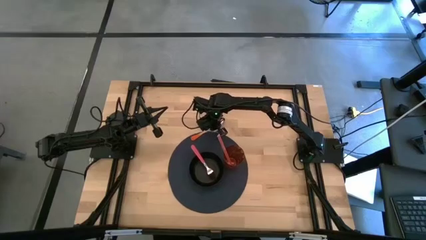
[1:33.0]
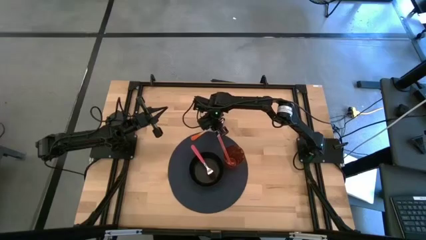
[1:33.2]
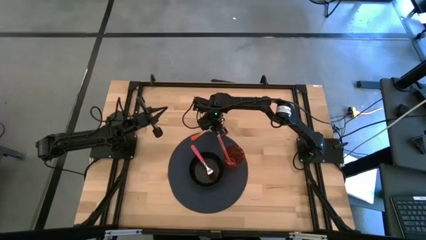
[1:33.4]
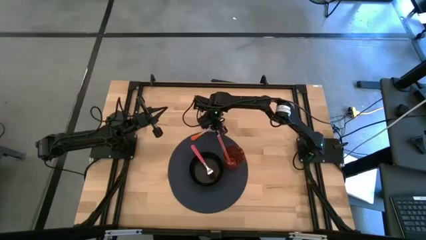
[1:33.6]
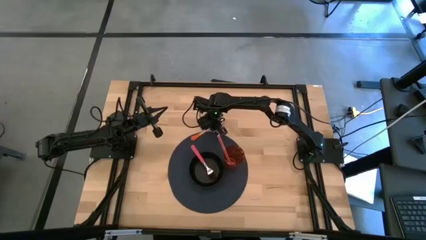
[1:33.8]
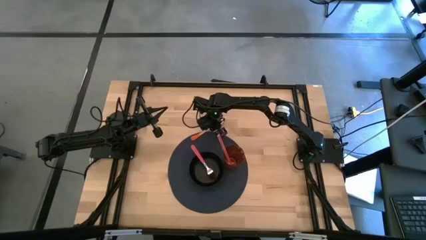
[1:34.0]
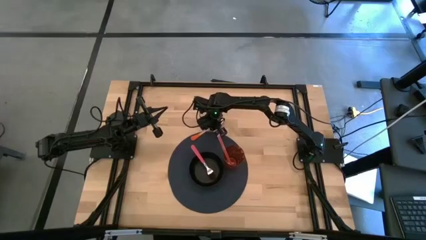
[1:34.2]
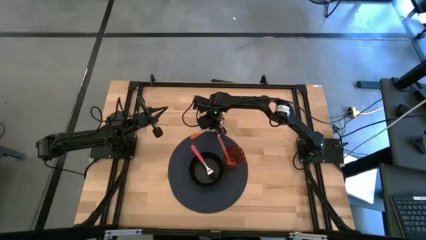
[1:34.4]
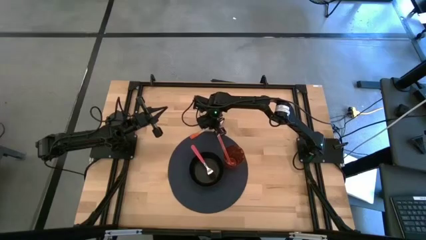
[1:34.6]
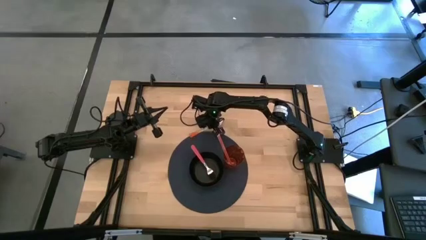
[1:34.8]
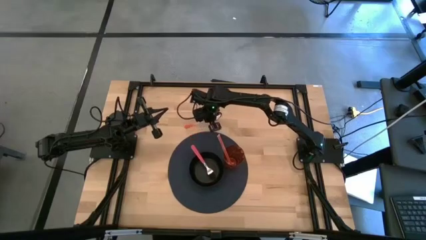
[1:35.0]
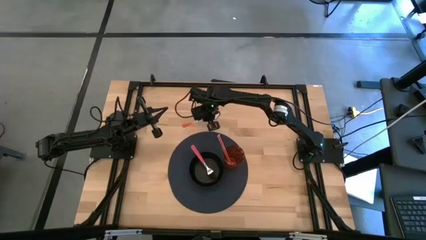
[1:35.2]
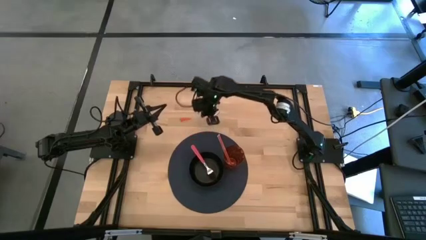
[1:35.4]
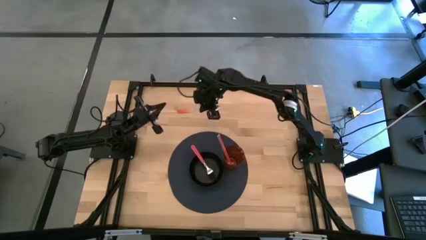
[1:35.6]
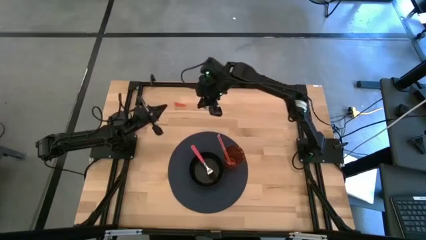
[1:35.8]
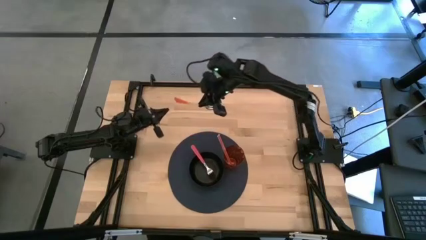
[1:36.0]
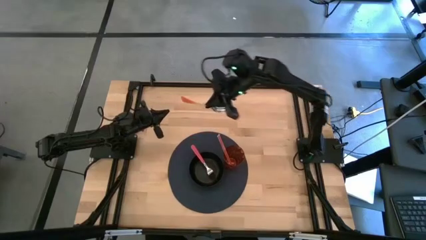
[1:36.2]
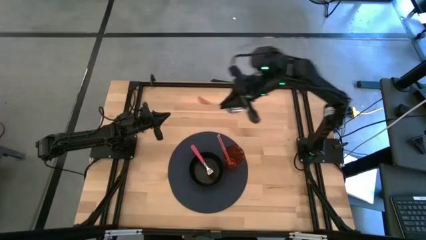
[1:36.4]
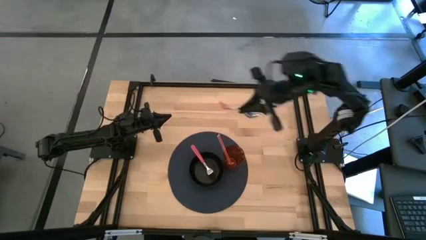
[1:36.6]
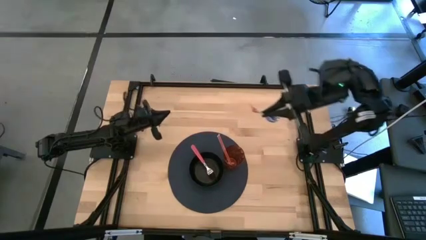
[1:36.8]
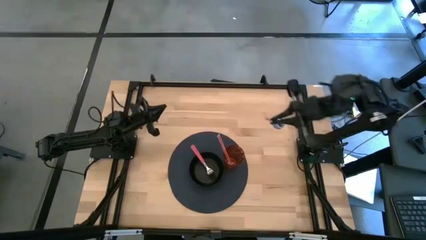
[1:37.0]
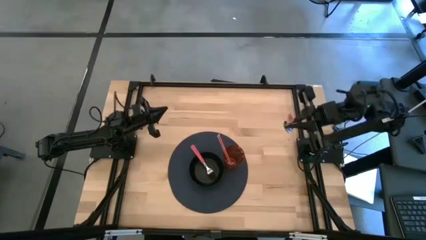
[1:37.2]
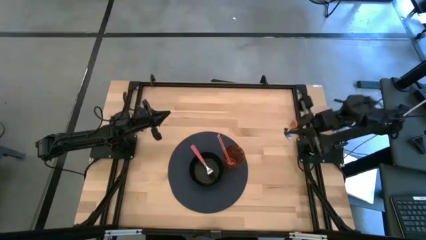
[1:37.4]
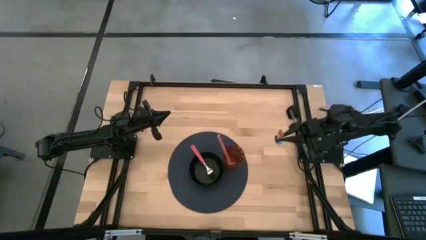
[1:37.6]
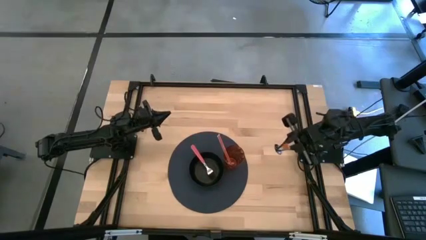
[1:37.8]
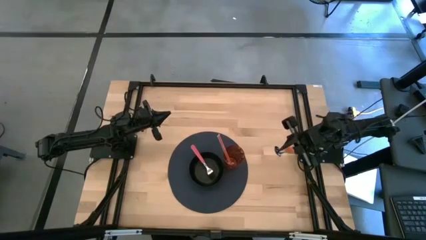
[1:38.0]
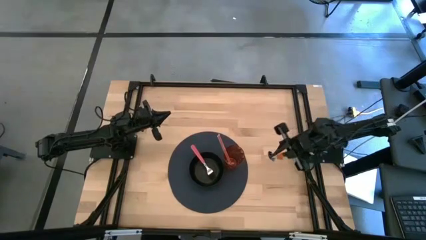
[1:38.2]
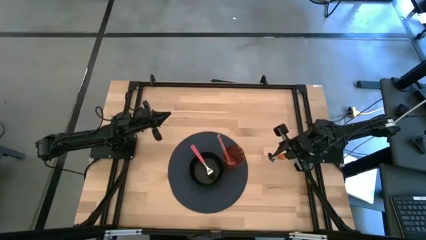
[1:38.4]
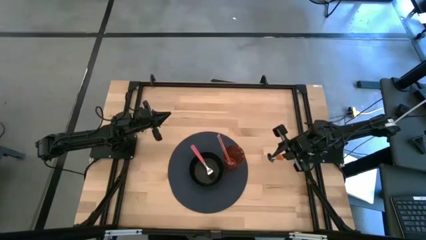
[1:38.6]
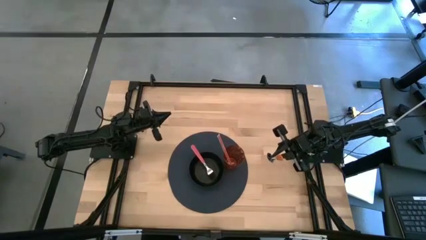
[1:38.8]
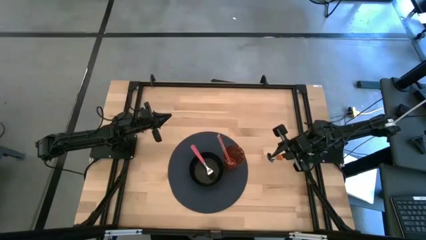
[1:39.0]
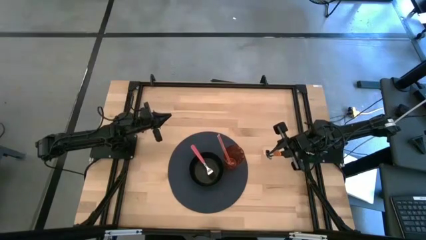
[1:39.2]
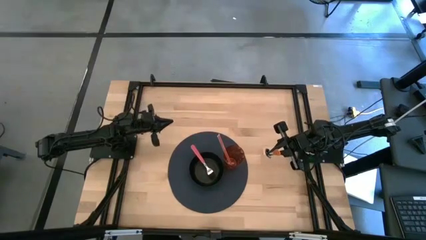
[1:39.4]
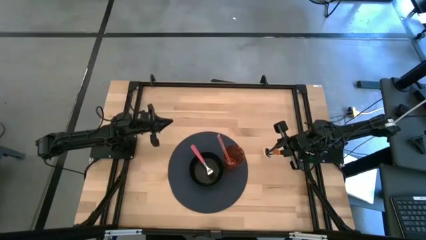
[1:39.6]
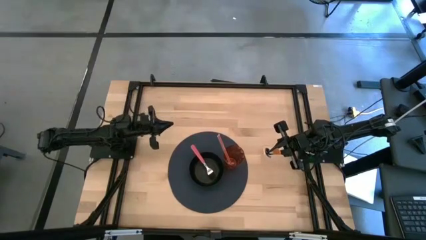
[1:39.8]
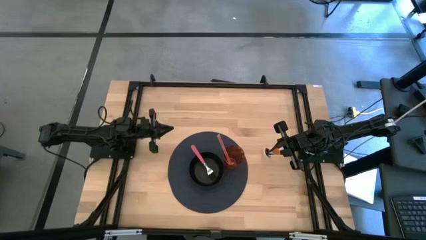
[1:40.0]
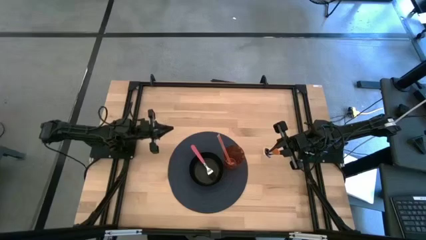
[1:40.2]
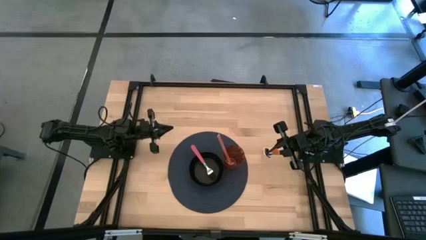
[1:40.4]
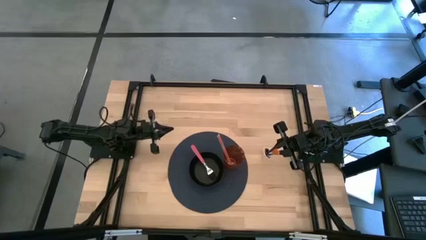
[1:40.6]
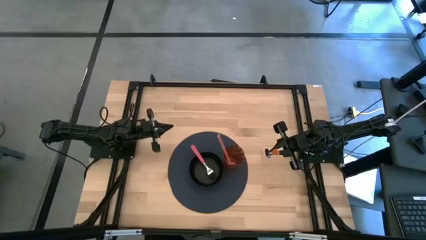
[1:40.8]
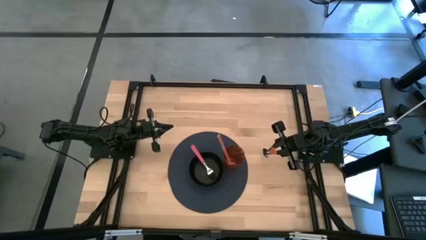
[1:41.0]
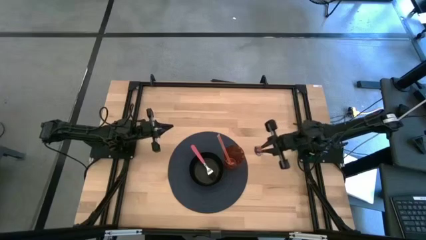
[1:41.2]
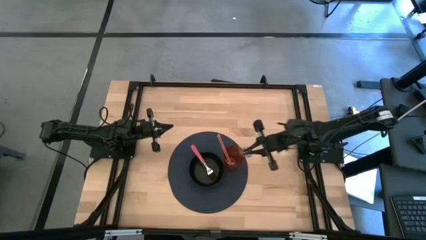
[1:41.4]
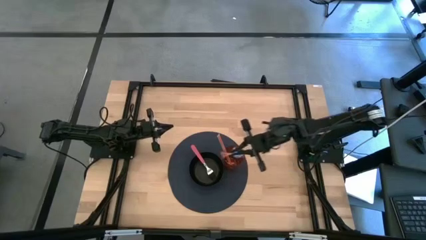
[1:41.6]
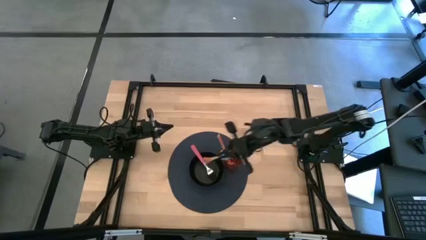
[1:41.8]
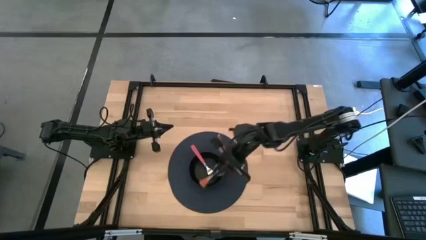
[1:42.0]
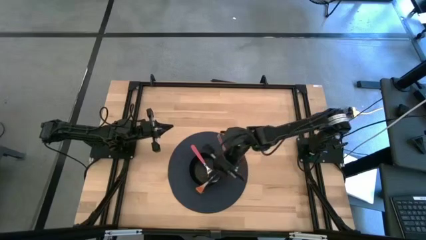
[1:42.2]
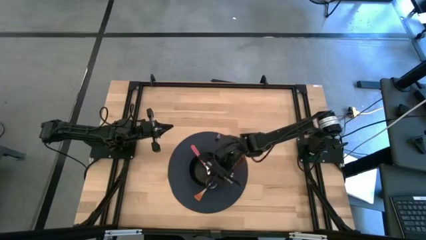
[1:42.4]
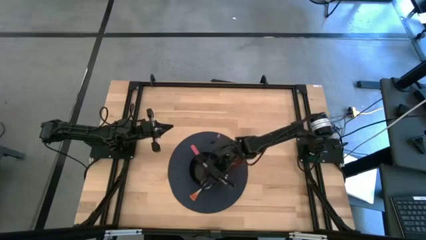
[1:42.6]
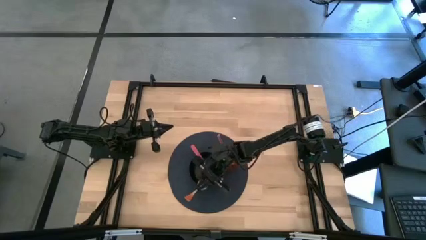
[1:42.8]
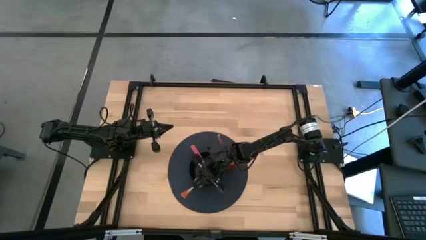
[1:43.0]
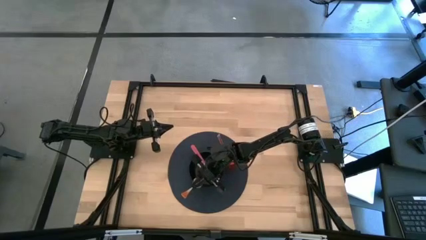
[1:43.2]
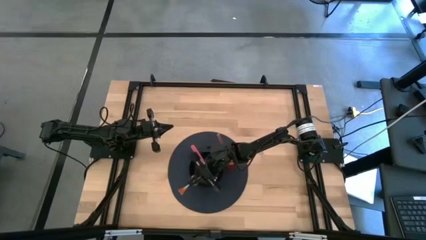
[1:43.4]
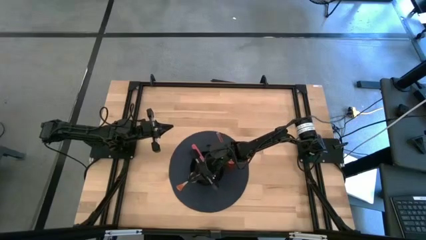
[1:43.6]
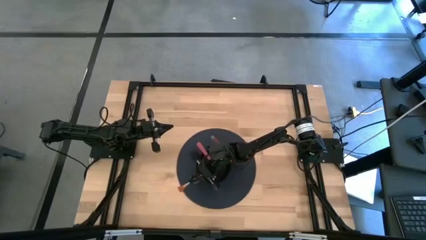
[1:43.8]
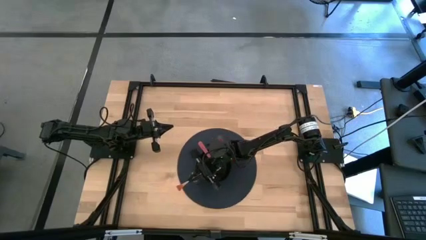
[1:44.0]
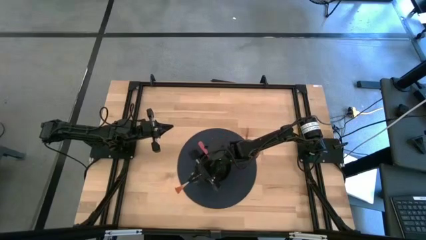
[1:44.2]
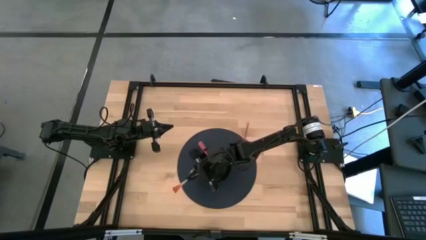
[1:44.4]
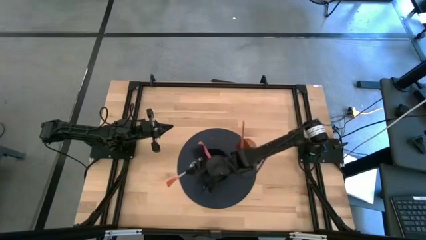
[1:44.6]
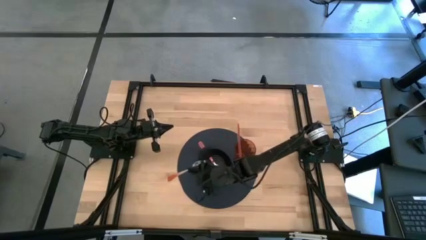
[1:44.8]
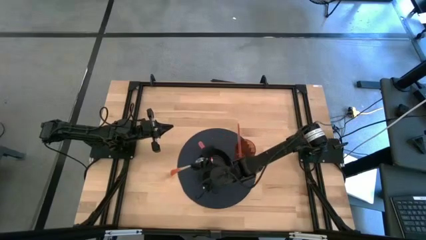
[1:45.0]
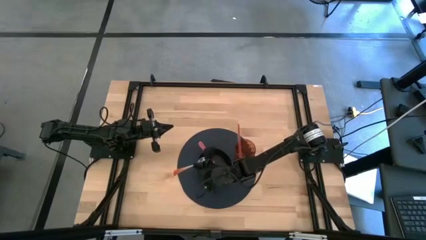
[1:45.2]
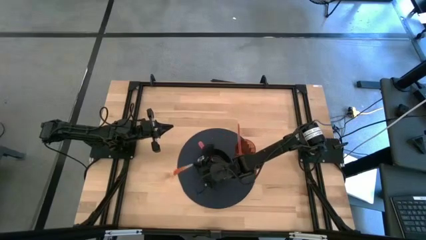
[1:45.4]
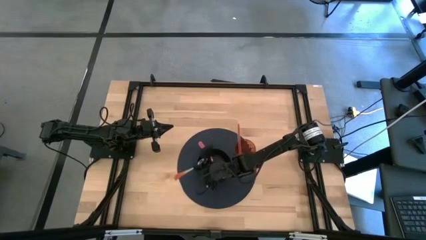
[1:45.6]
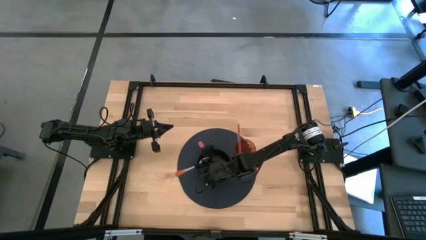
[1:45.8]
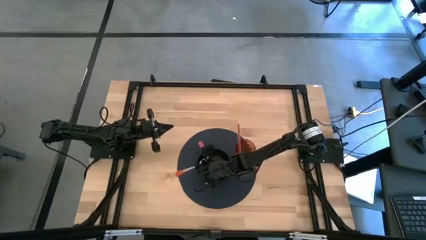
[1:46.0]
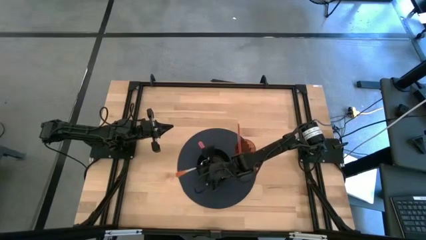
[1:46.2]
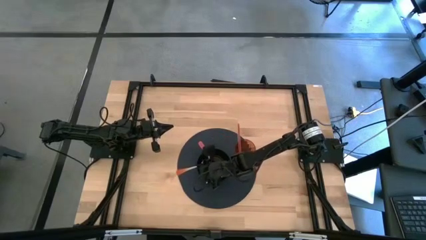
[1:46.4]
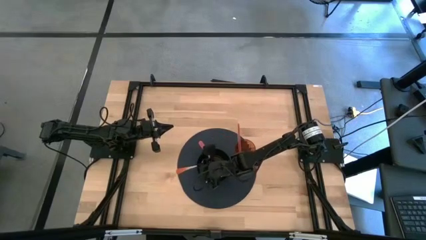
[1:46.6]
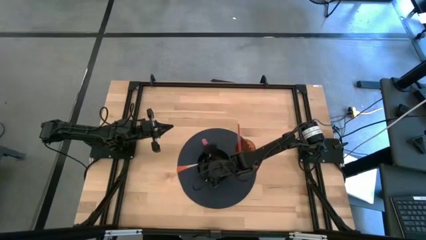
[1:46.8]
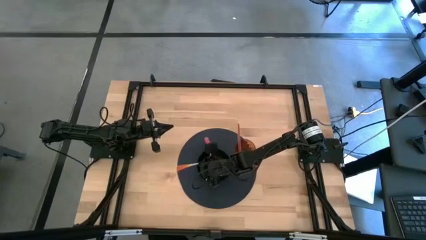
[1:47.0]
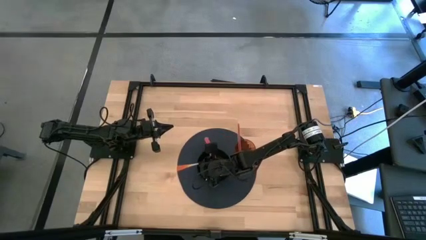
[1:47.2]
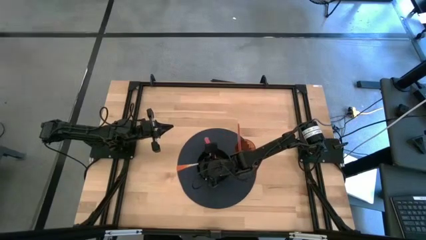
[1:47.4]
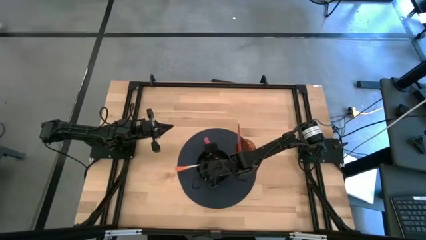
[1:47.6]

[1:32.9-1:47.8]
Task: Pick & Place Utensil
Put the orange spoon into the black bowl
